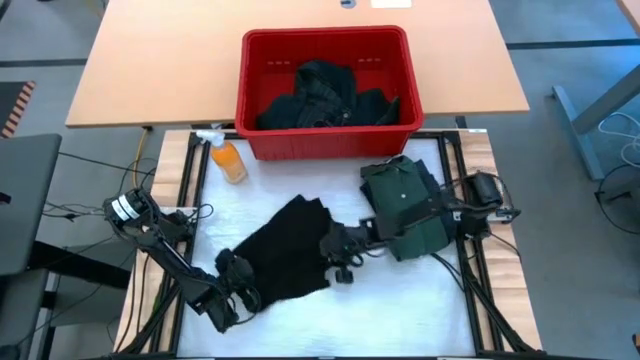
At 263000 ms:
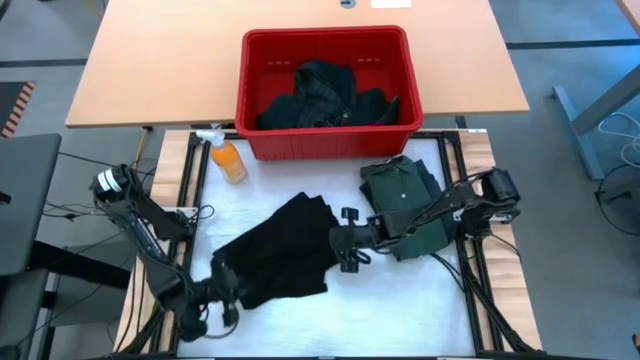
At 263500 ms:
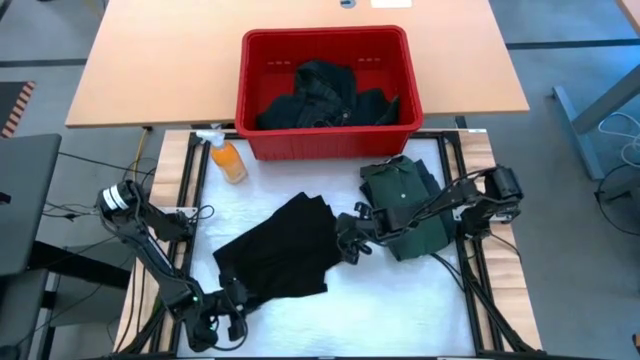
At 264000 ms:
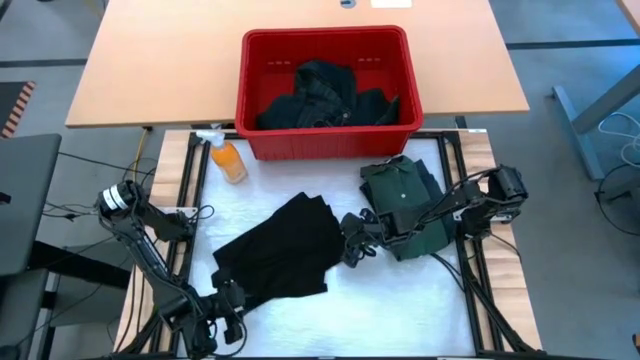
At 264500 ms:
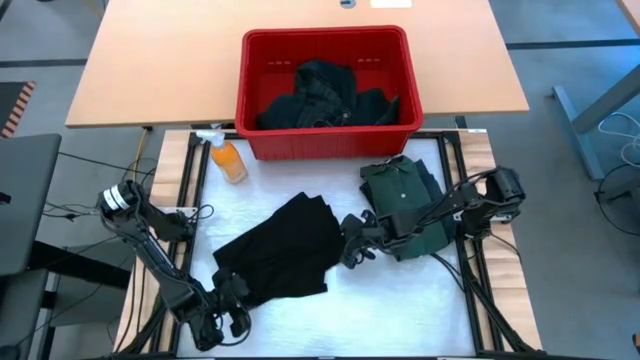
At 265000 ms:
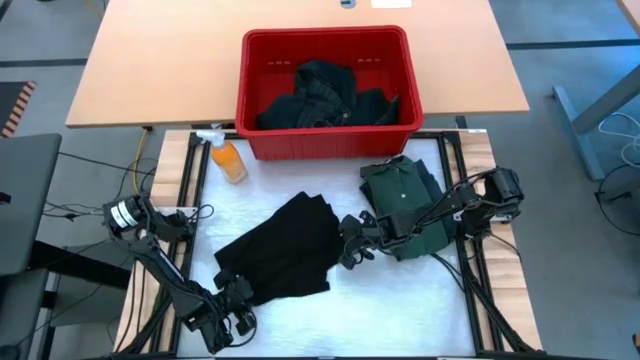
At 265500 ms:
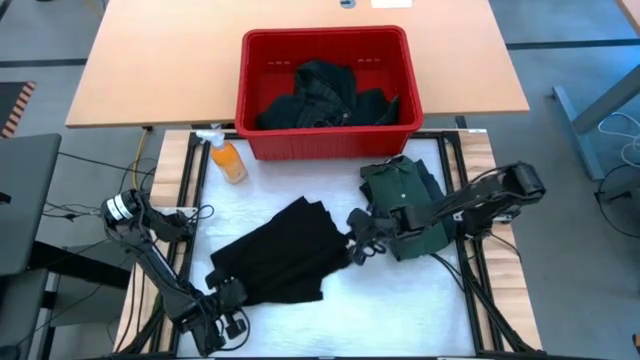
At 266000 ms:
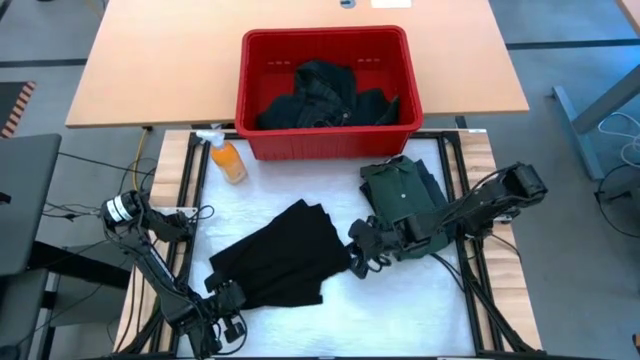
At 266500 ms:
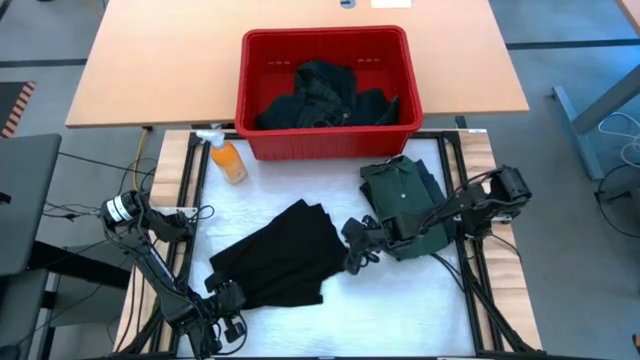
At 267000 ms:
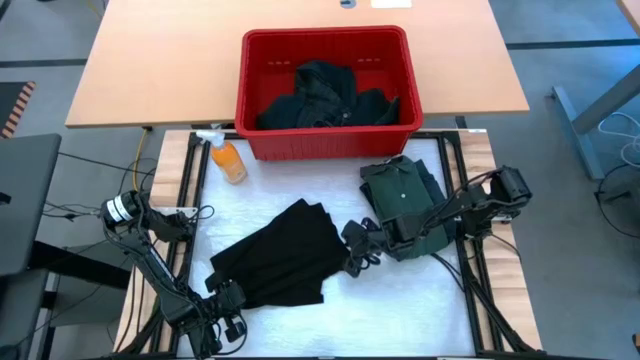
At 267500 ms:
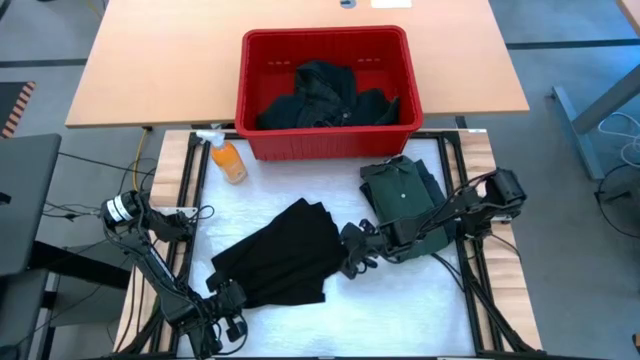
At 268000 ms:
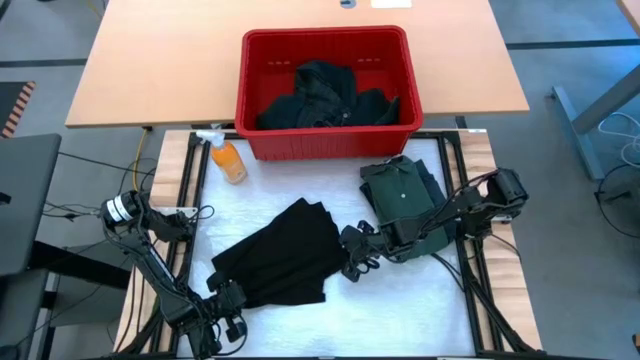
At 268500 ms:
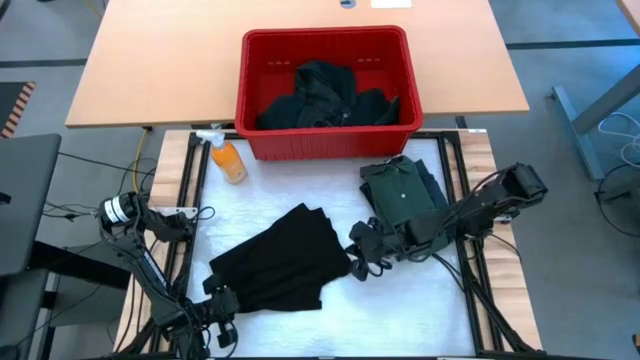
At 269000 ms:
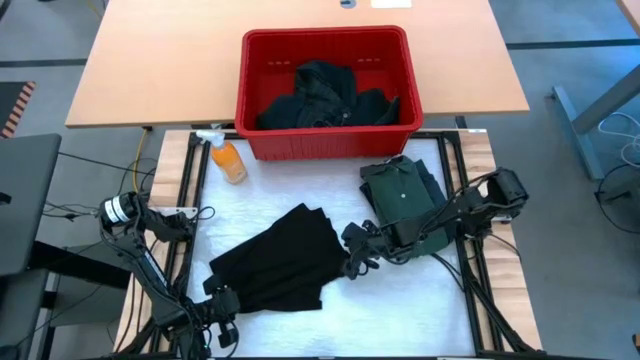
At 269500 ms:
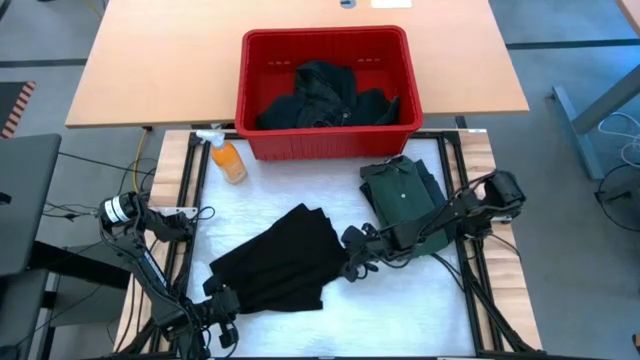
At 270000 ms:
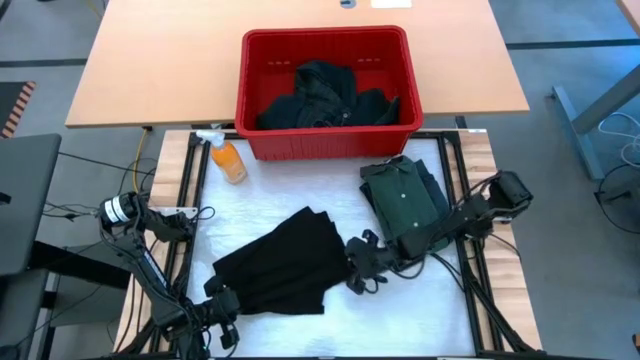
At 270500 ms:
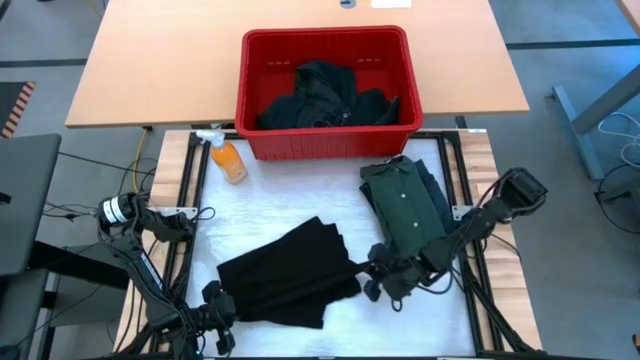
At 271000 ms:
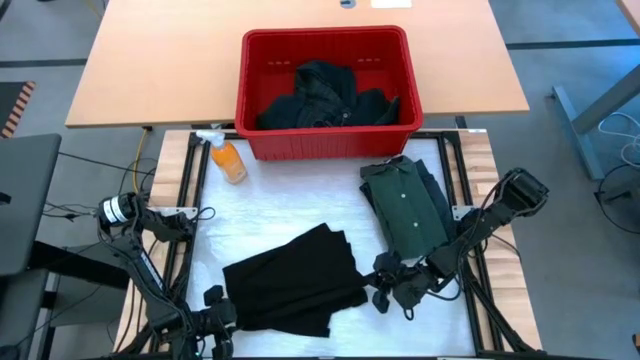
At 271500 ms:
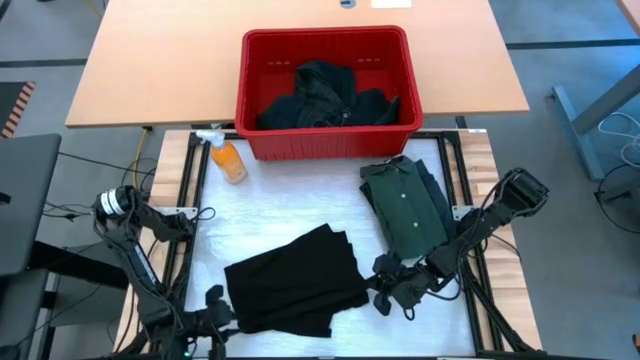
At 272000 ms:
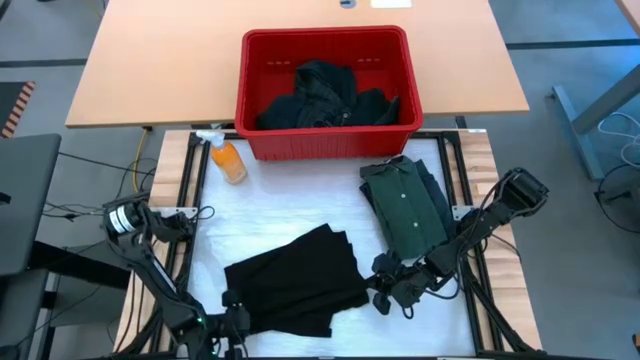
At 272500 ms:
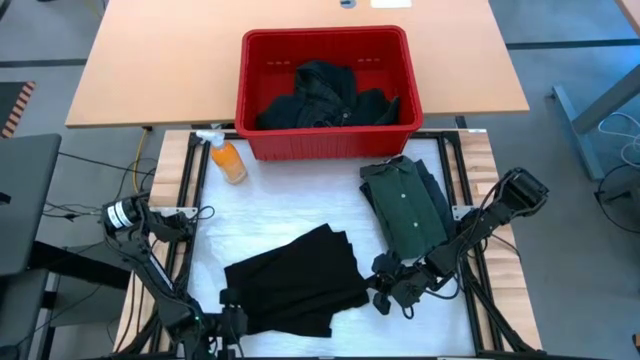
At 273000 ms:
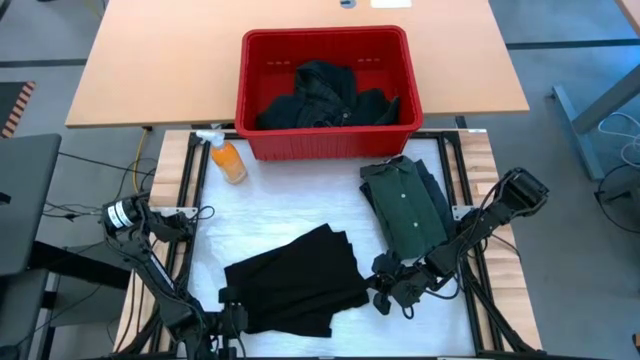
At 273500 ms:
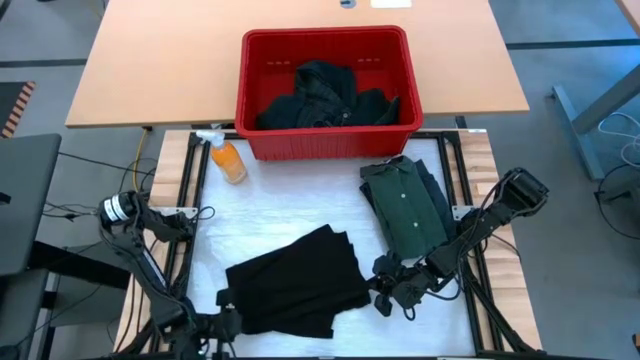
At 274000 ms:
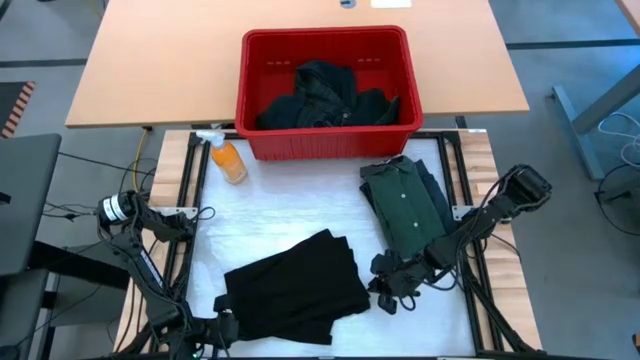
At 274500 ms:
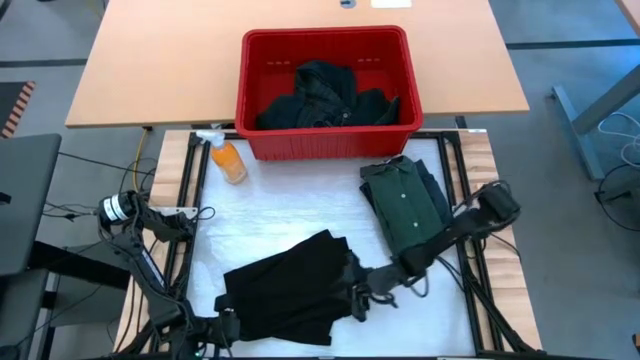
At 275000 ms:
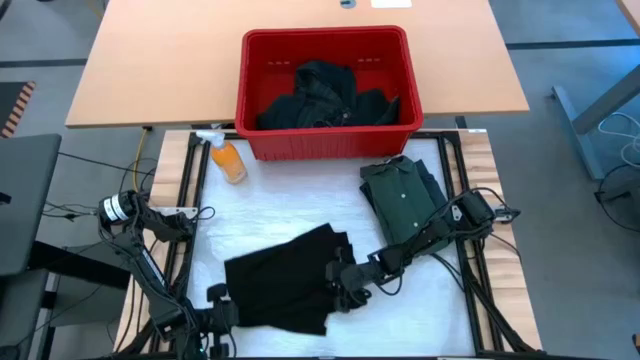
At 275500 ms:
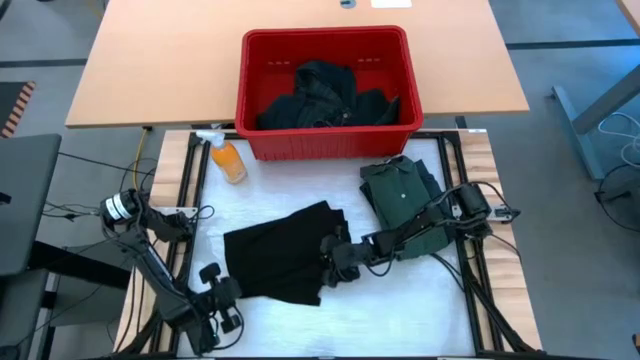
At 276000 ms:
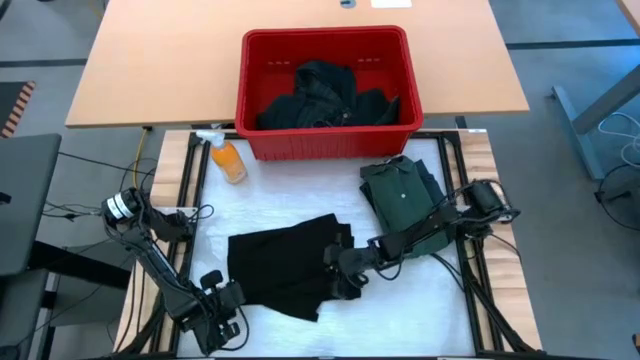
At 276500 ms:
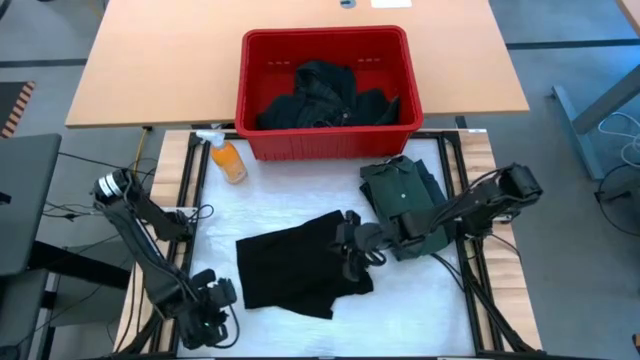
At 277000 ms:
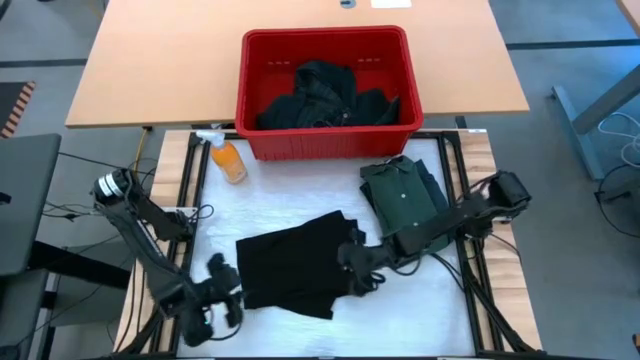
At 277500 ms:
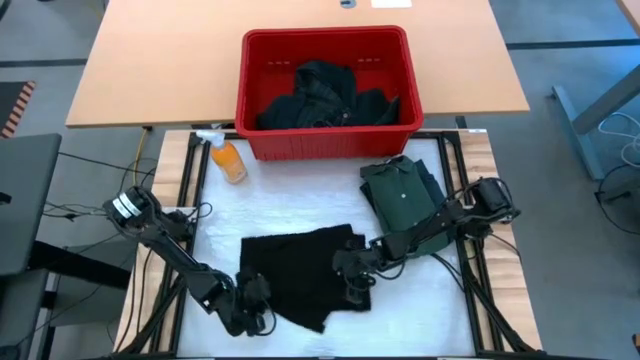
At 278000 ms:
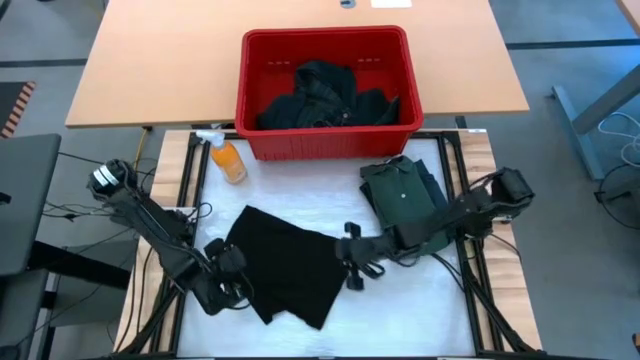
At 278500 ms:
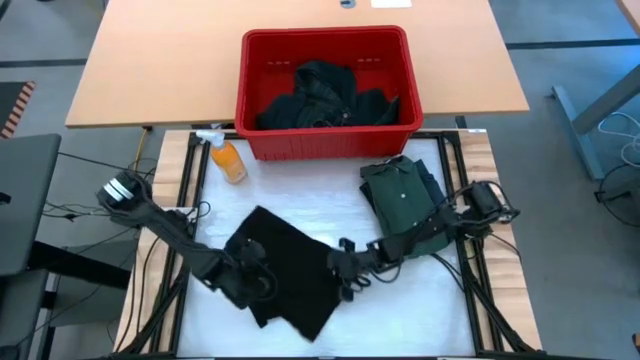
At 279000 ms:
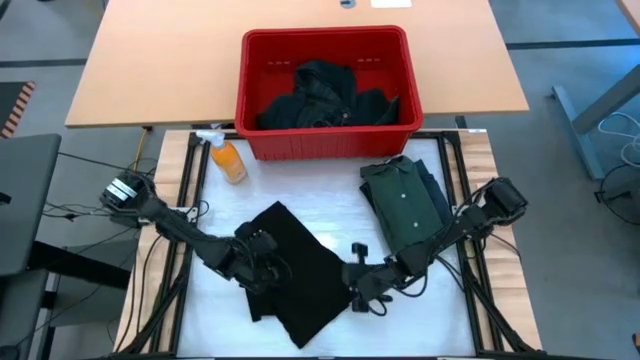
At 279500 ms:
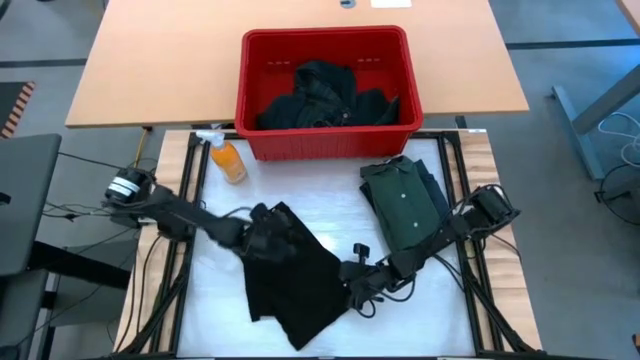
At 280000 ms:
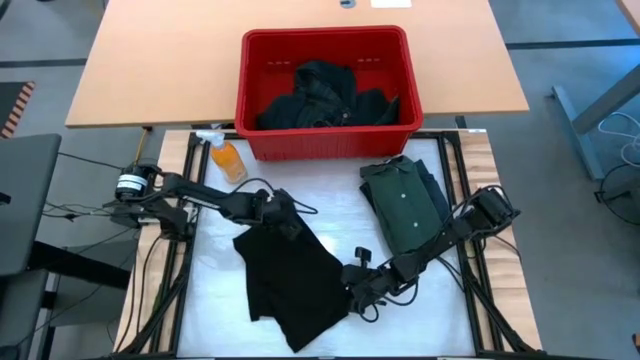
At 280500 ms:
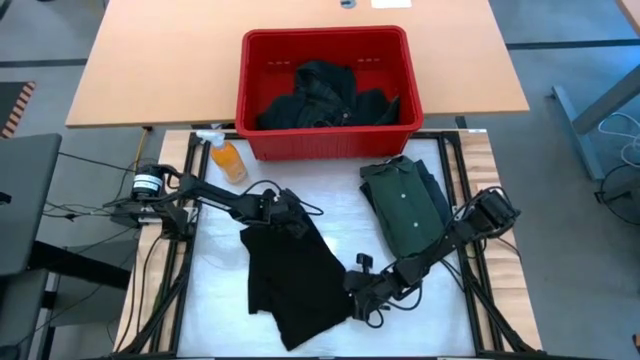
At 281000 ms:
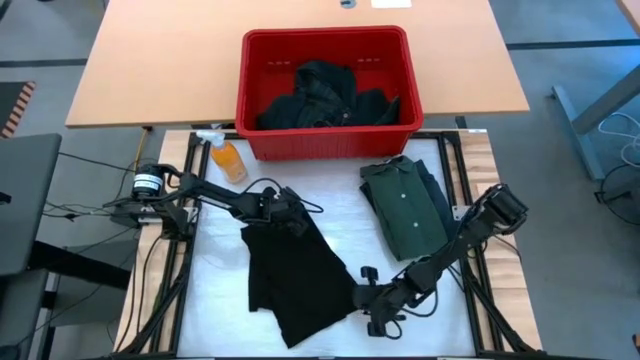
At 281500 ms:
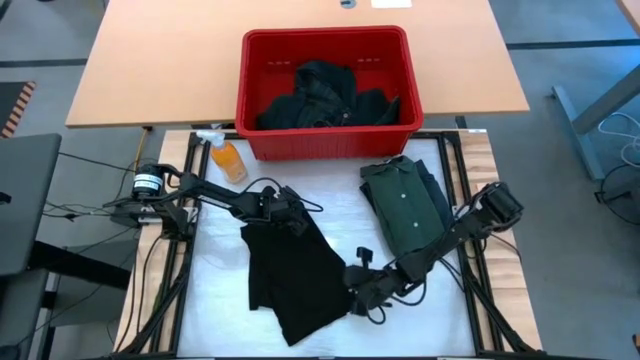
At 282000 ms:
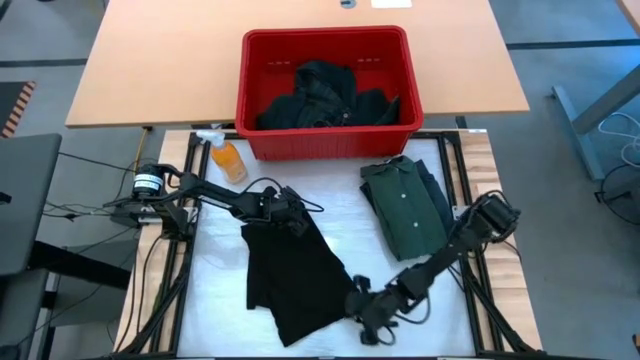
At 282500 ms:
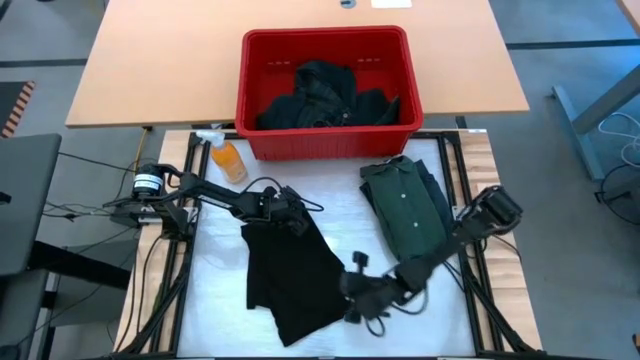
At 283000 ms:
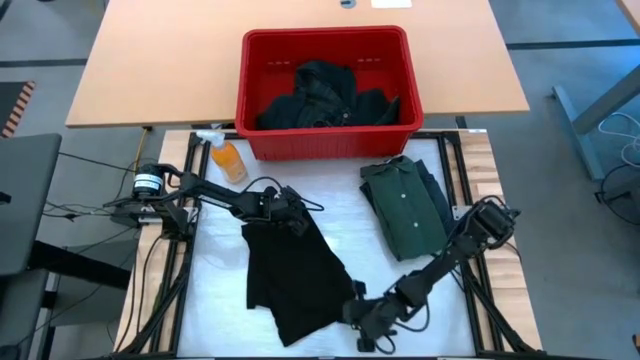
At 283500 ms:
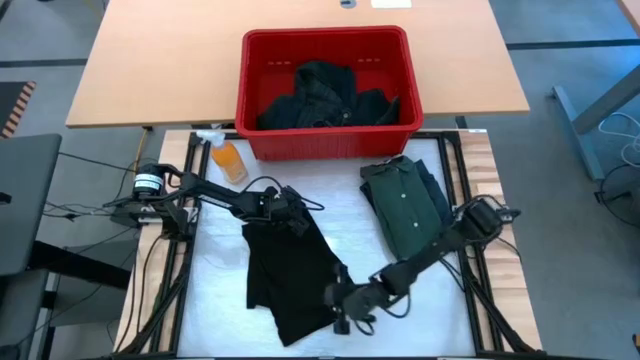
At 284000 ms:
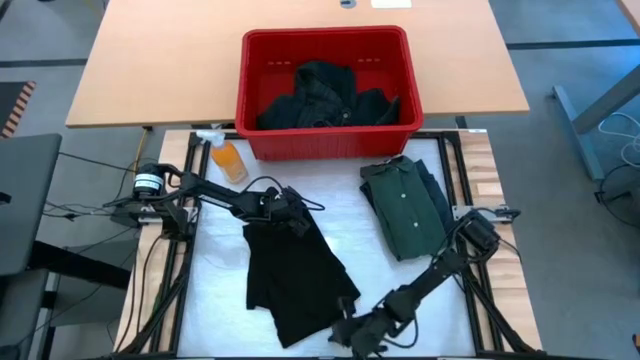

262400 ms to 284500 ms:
Task: Fold laundry
Fold the black shirt
